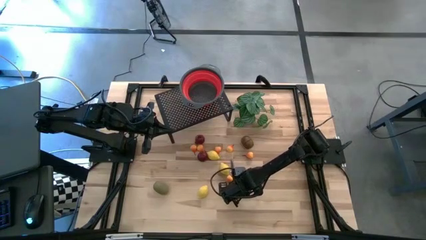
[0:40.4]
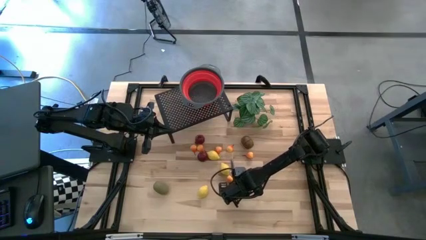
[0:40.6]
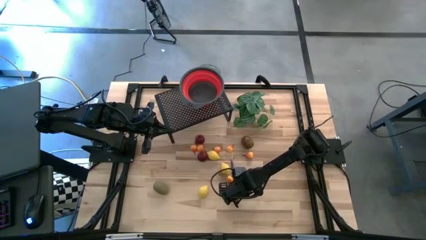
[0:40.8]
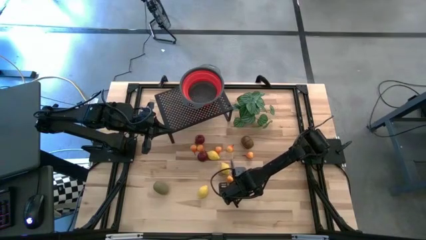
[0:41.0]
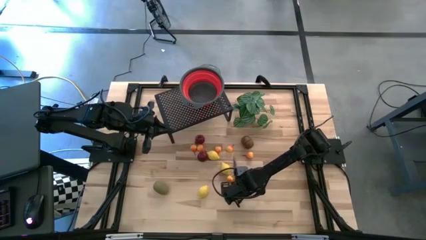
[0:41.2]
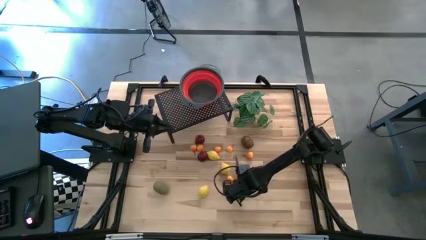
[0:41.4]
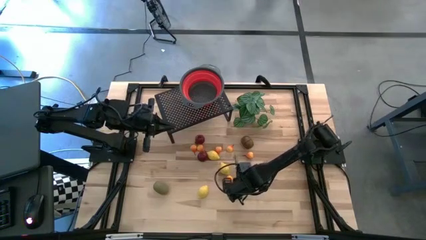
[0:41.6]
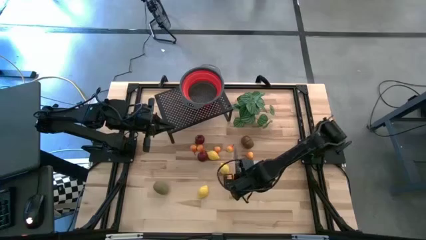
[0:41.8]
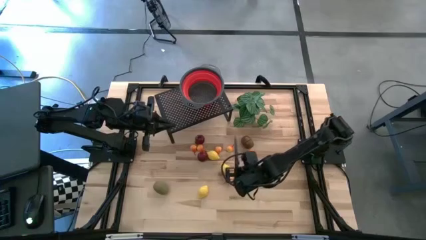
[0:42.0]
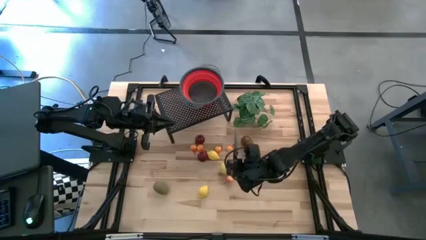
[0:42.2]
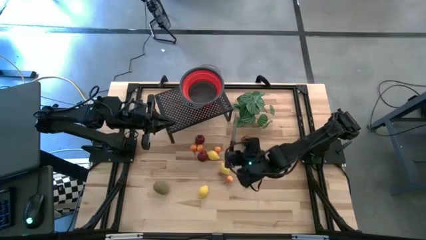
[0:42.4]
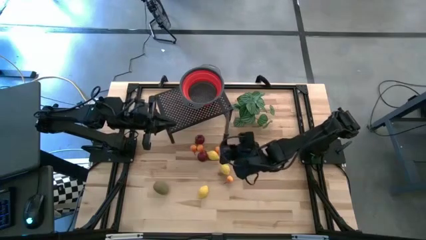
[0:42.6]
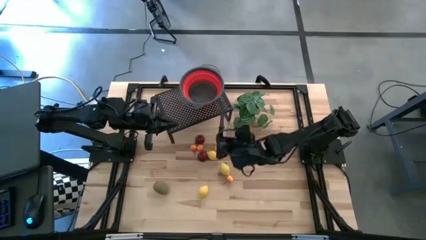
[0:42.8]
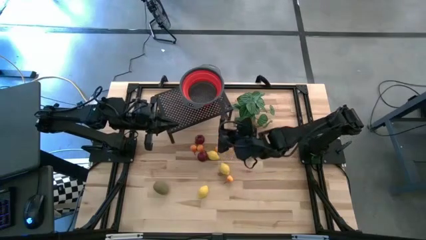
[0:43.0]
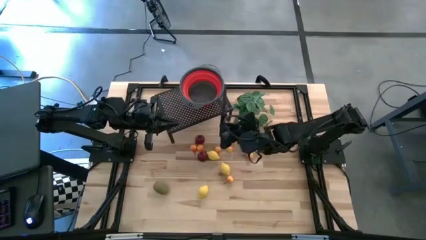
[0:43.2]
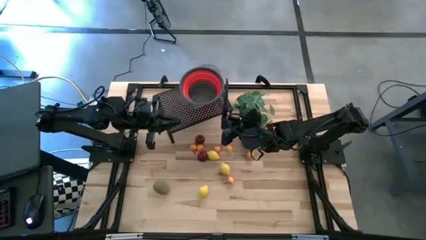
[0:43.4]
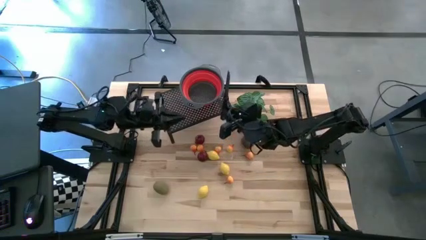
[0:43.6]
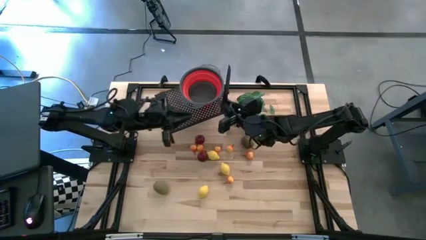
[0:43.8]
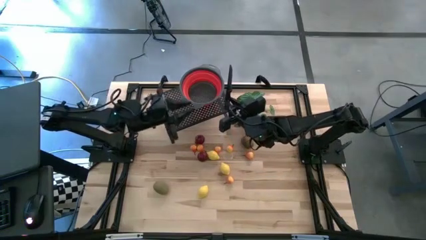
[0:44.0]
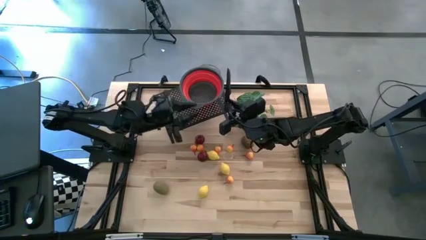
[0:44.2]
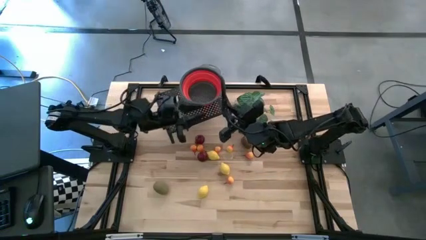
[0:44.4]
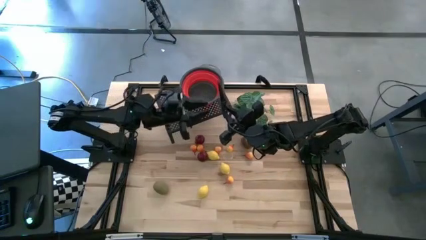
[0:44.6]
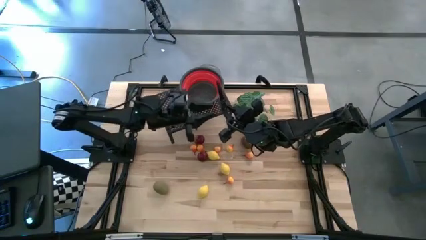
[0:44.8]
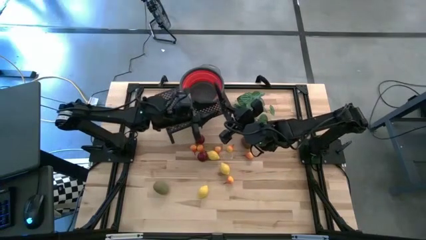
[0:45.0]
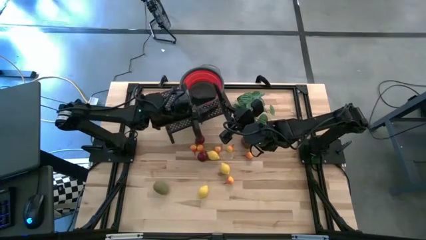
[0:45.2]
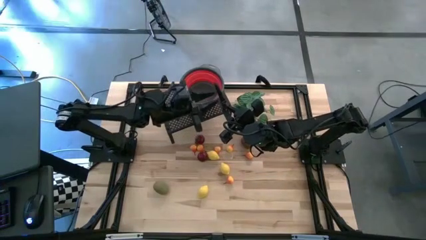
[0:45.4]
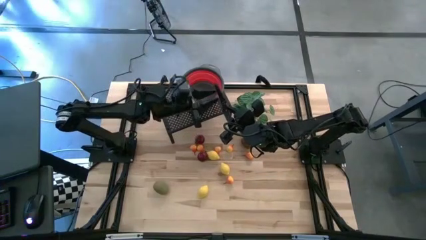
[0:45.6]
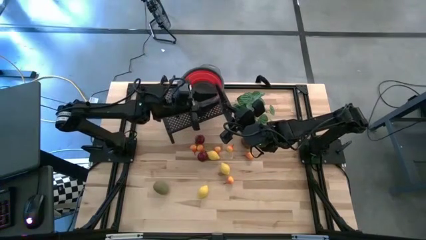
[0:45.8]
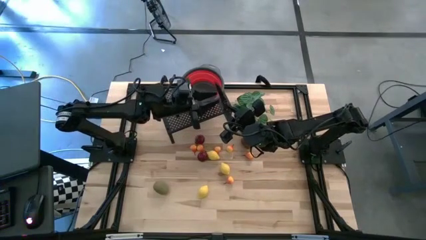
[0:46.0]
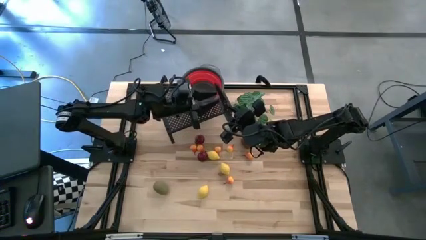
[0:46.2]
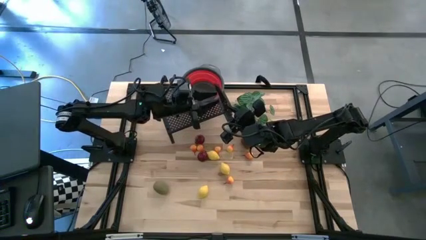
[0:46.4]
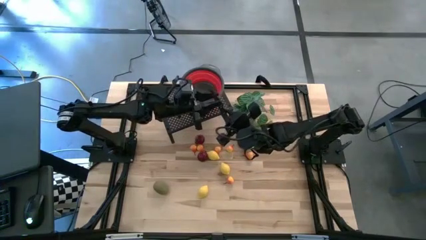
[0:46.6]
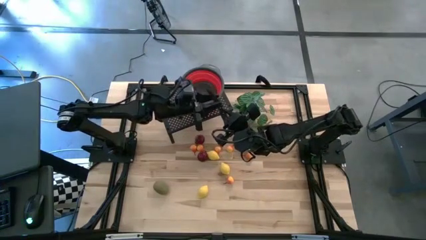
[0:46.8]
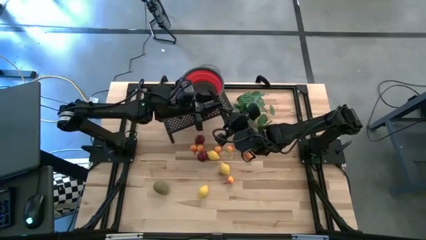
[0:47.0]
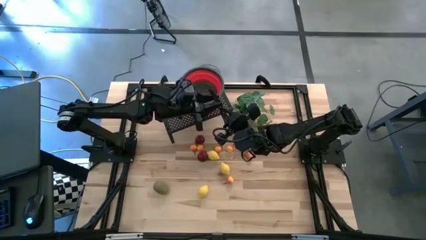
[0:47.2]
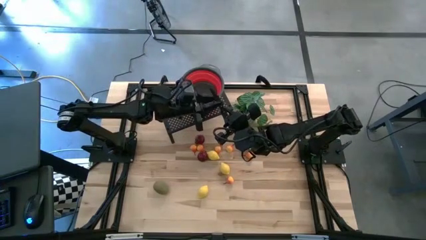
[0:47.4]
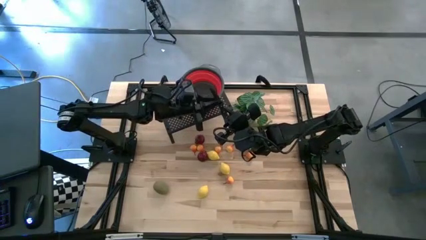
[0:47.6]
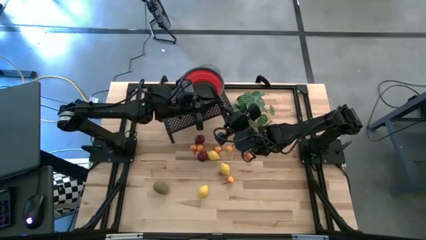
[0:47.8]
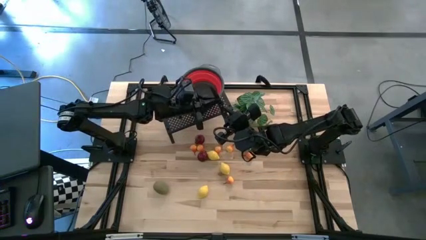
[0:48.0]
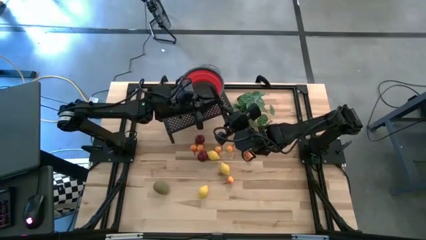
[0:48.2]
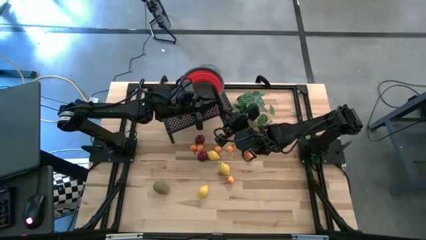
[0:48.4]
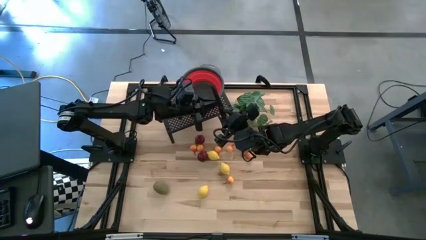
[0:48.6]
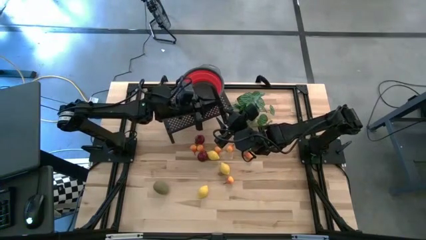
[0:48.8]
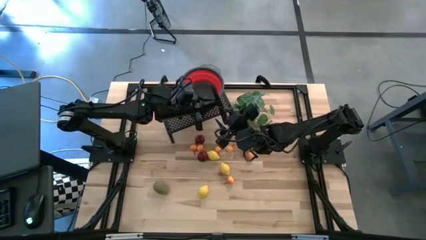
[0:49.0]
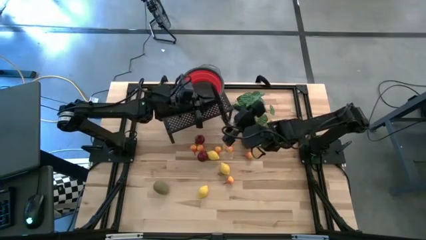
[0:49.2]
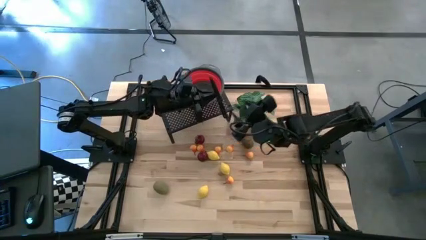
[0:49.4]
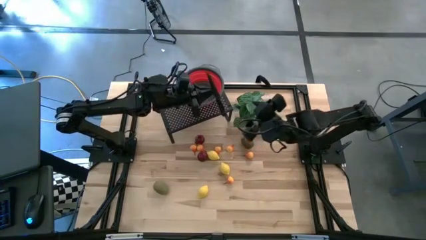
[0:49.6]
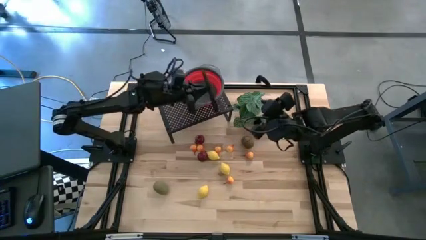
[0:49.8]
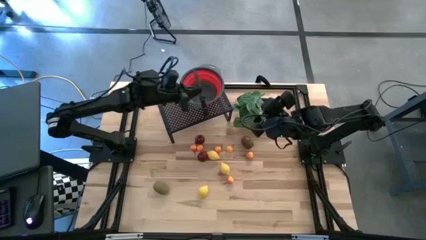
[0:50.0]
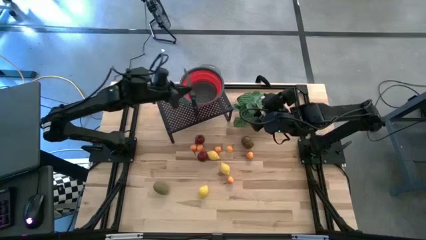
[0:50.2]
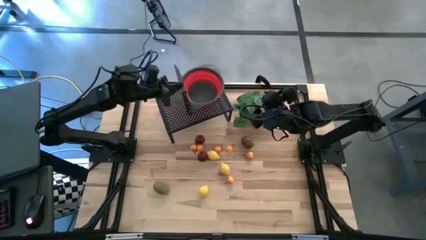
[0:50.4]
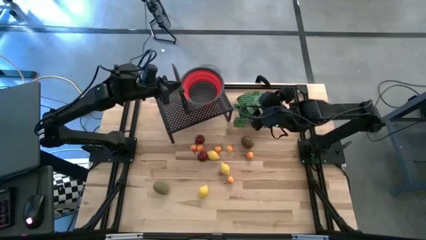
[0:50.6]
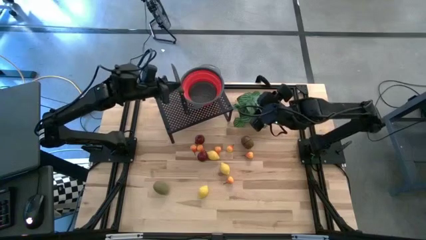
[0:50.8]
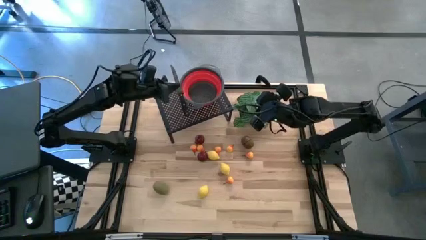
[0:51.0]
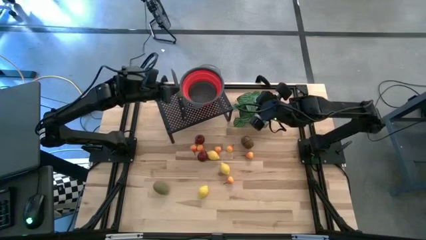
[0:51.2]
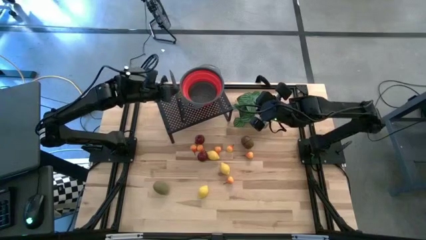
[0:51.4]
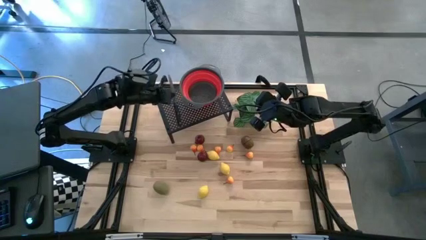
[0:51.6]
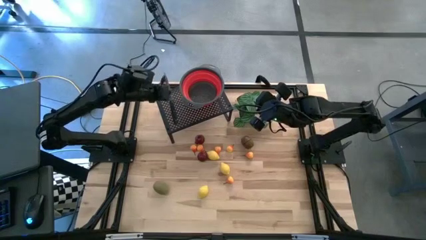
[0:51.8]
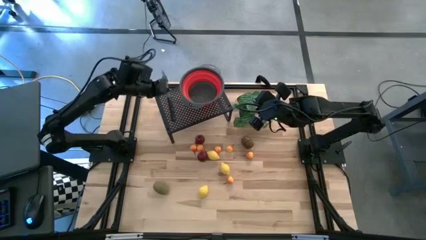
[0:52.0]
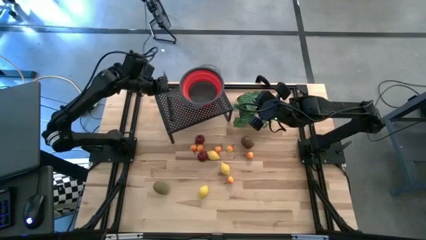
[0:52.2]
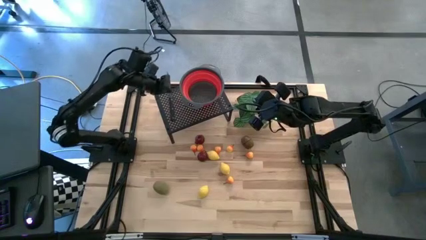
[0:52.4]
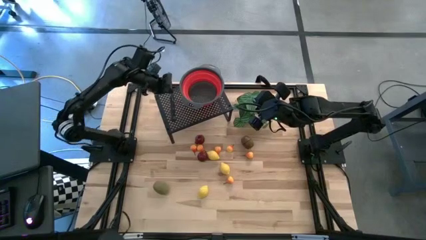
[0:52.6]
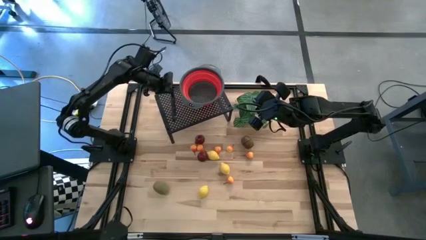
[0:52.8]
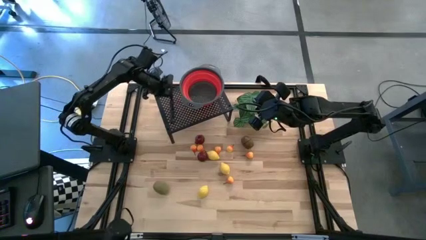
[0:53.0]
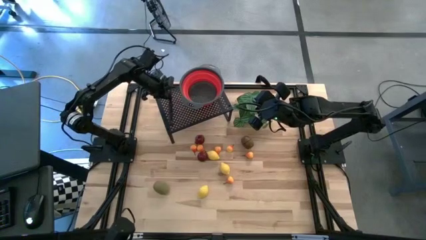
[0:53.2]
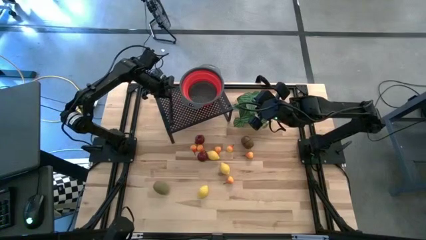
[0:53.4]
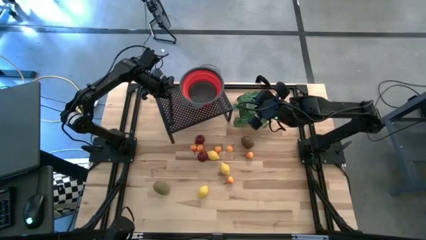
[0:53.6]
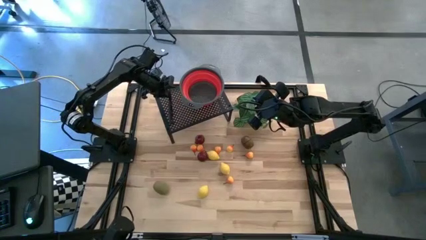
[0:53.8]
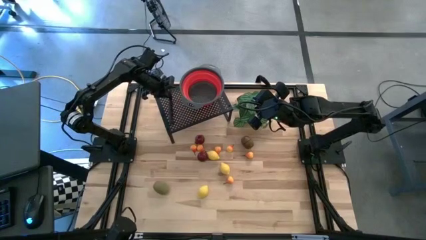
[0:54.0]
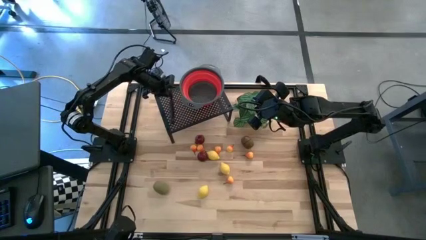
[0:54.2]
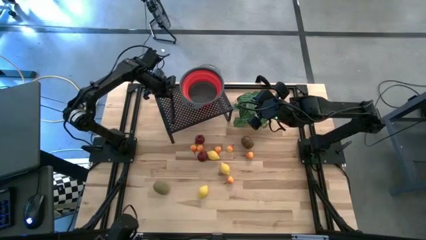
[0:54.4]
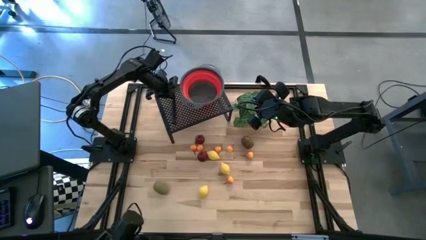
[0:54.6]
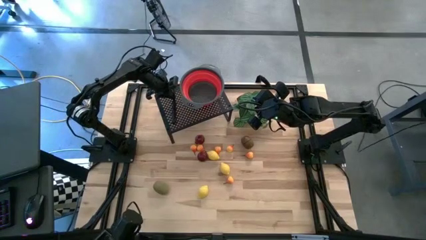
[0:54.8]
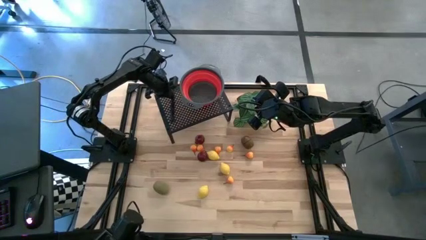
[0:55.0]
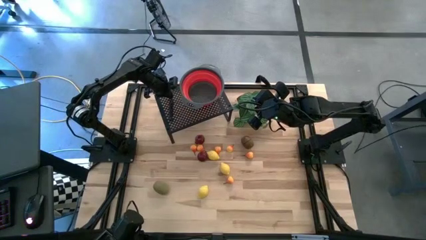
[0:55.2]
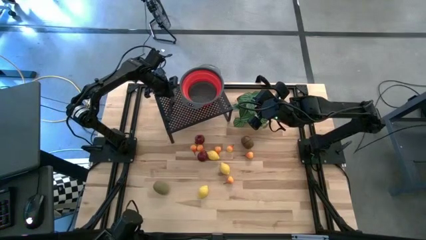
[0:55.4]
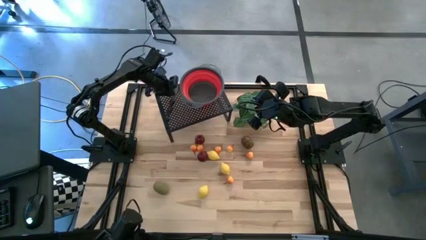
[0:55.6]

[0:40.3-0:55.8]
Task: Pick & Place Fruit
Put the black knife on the shelf
